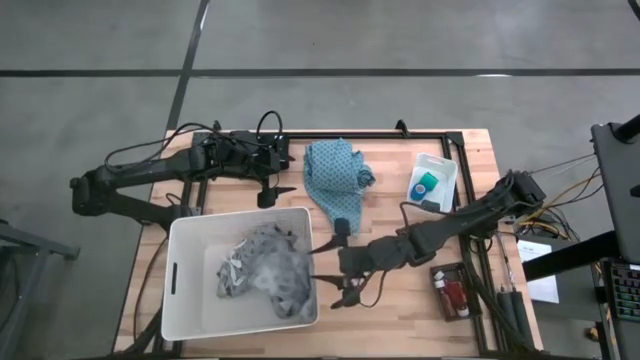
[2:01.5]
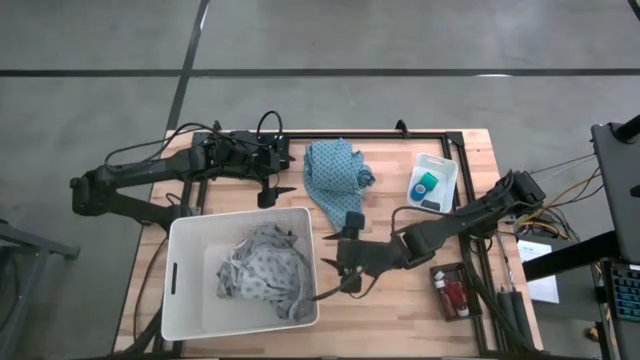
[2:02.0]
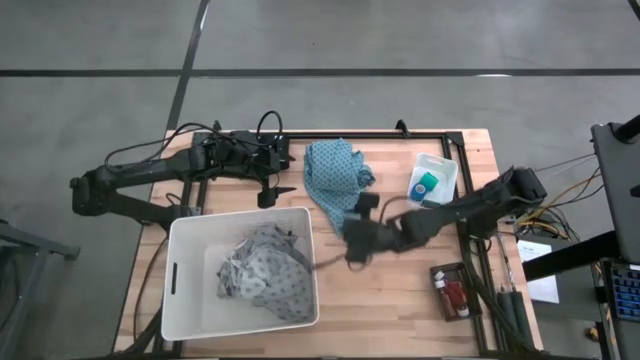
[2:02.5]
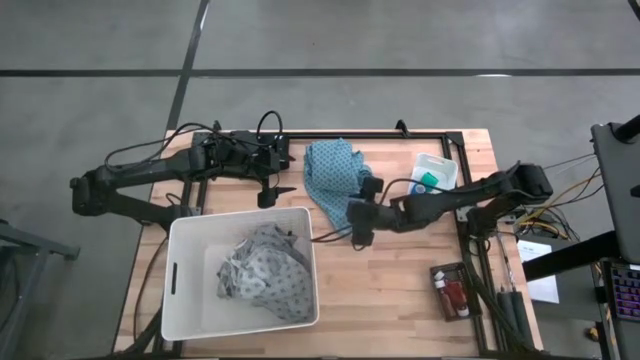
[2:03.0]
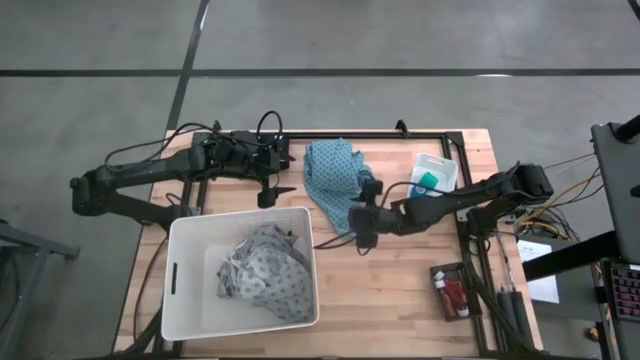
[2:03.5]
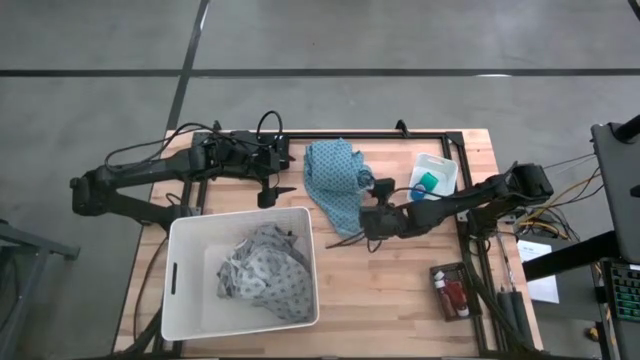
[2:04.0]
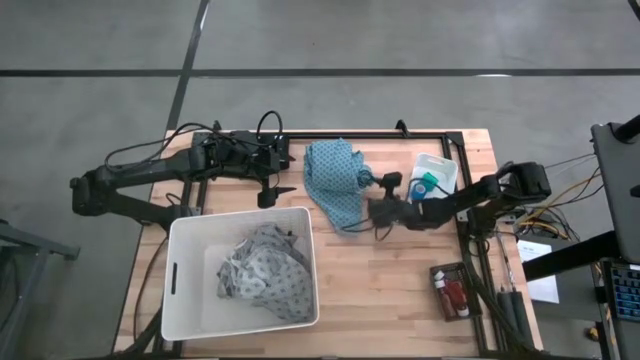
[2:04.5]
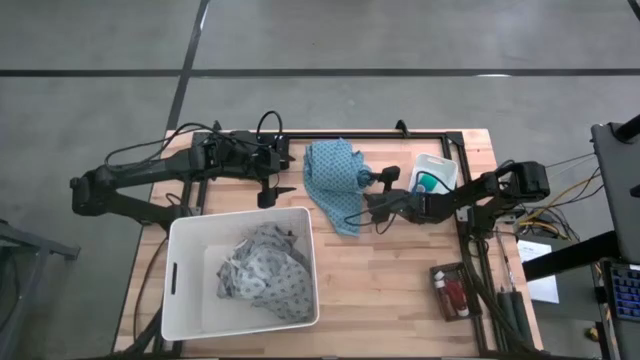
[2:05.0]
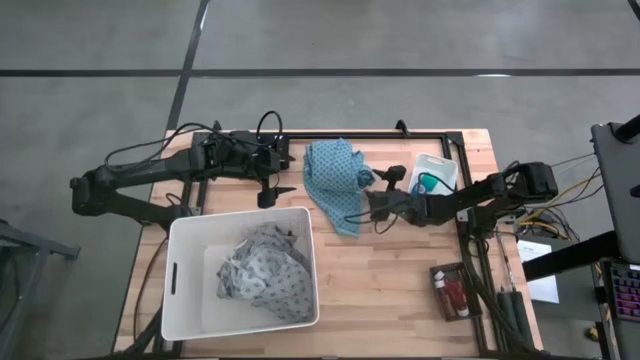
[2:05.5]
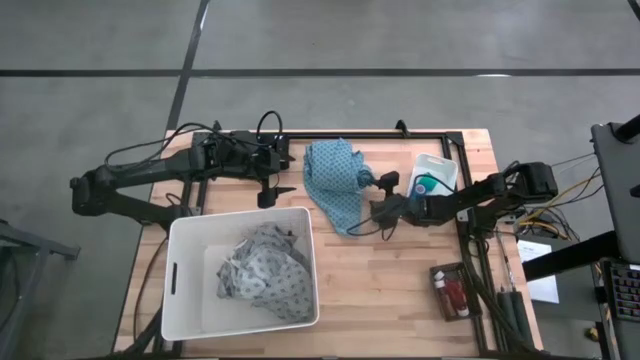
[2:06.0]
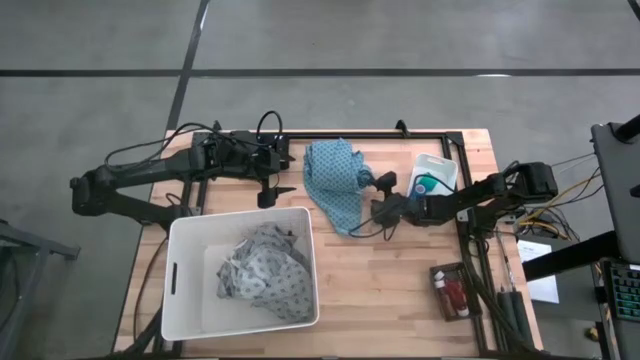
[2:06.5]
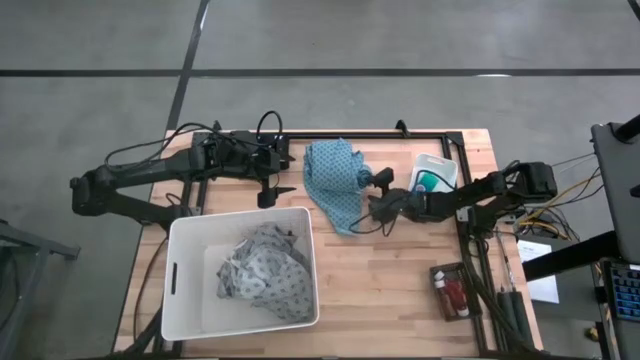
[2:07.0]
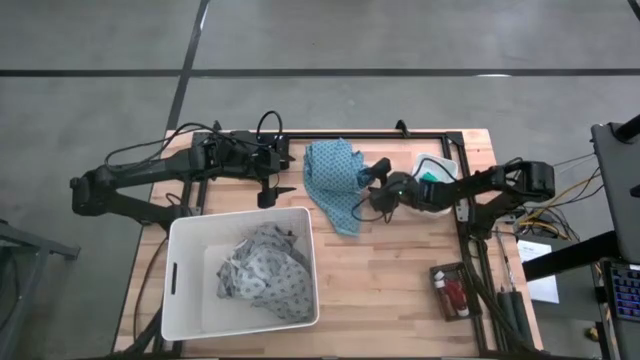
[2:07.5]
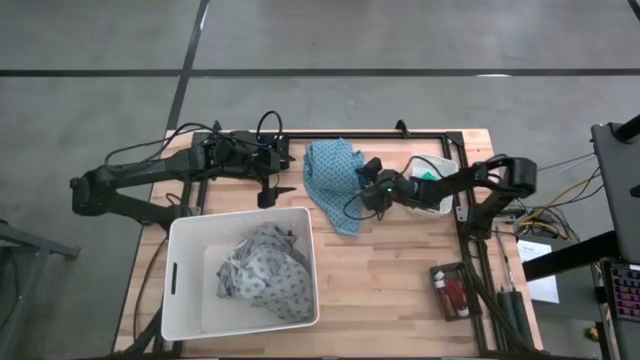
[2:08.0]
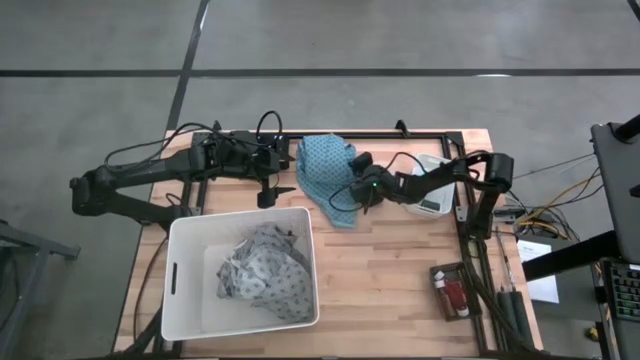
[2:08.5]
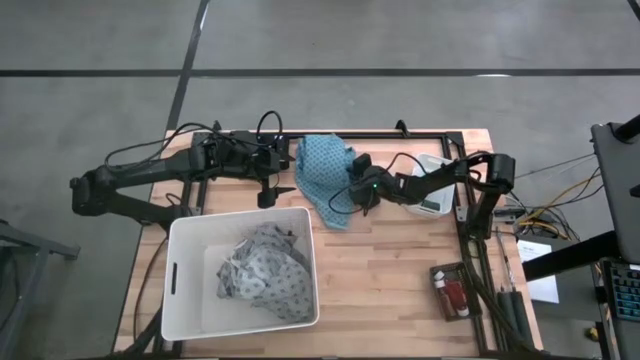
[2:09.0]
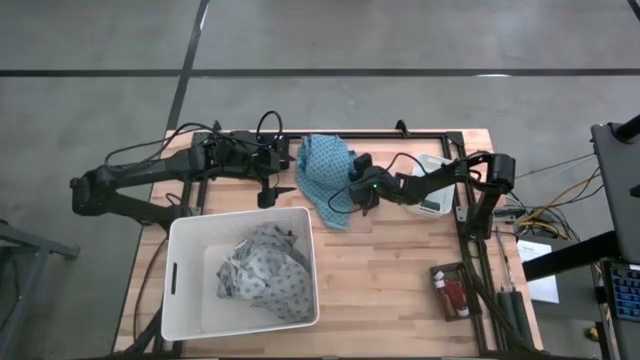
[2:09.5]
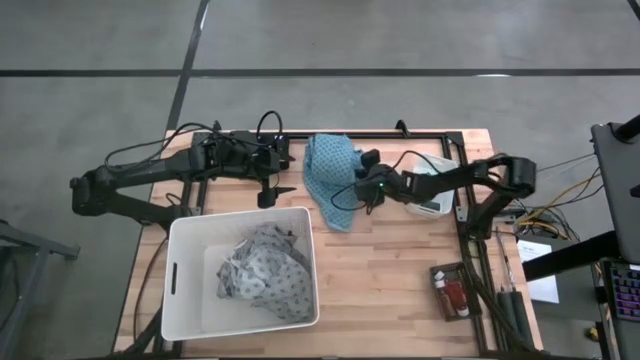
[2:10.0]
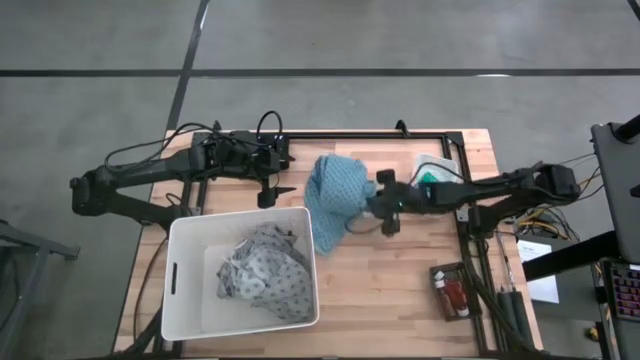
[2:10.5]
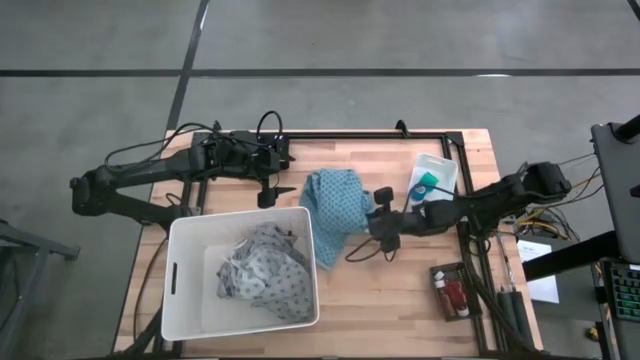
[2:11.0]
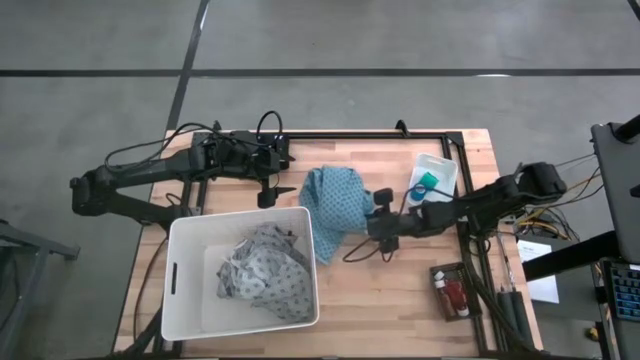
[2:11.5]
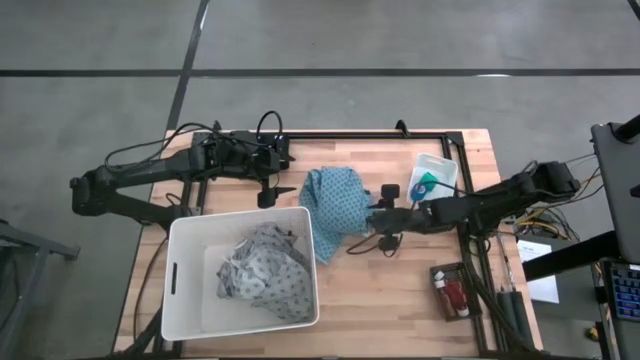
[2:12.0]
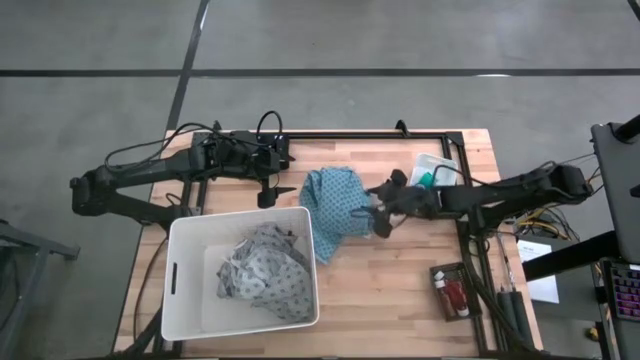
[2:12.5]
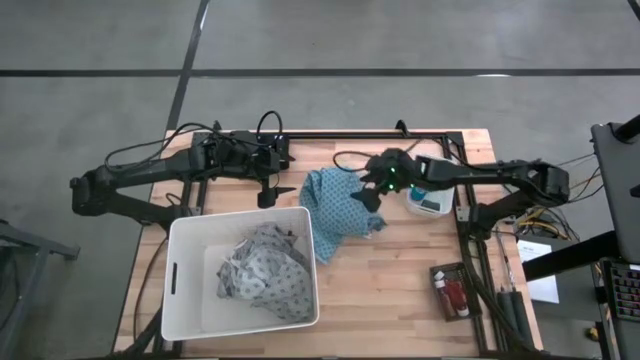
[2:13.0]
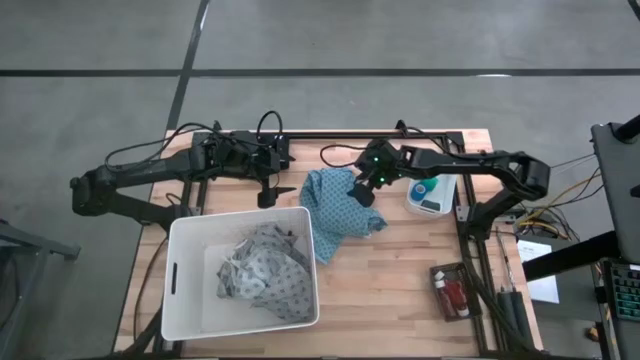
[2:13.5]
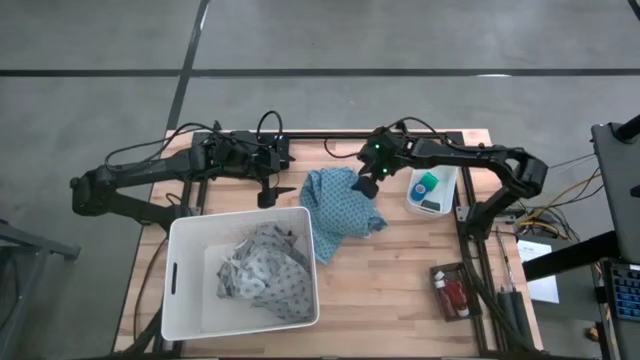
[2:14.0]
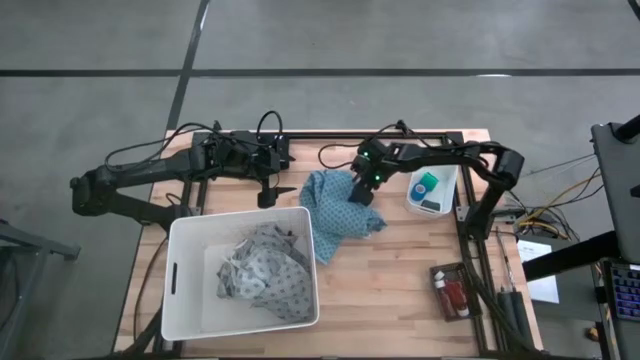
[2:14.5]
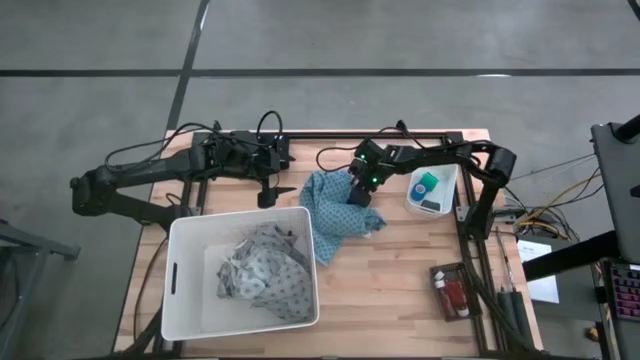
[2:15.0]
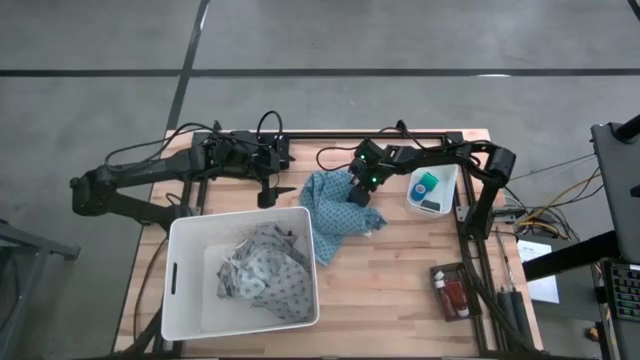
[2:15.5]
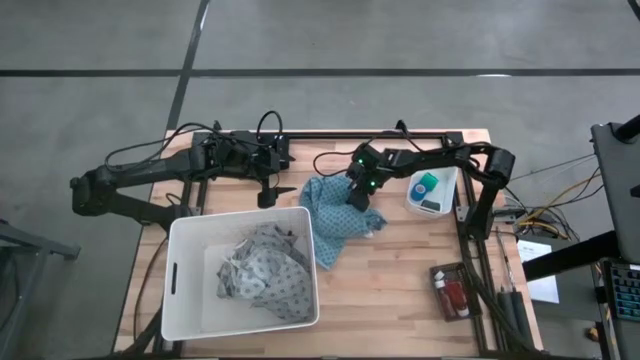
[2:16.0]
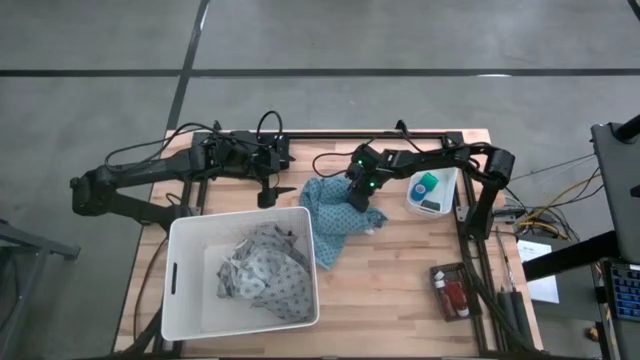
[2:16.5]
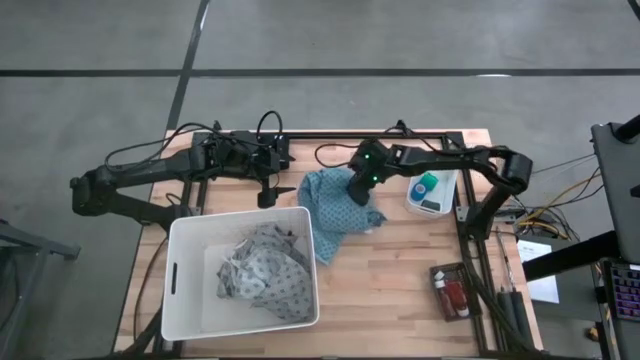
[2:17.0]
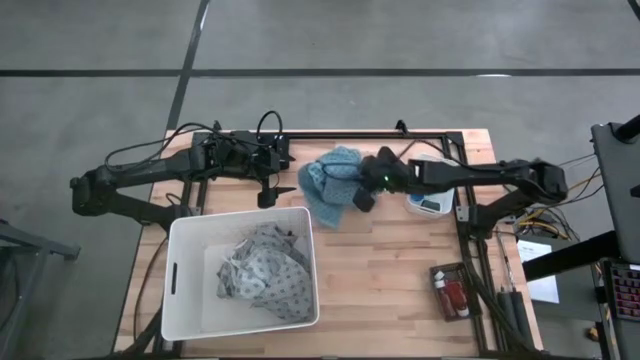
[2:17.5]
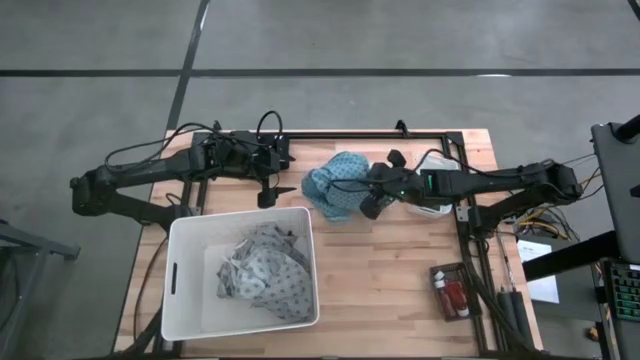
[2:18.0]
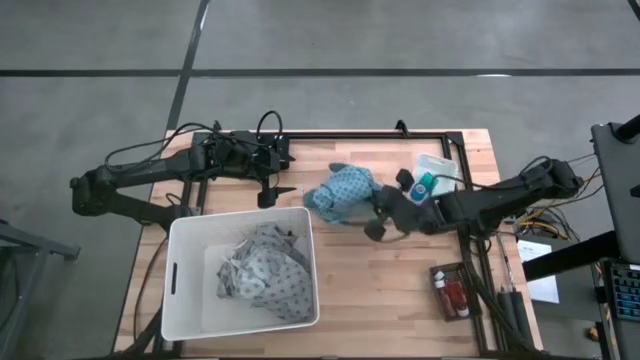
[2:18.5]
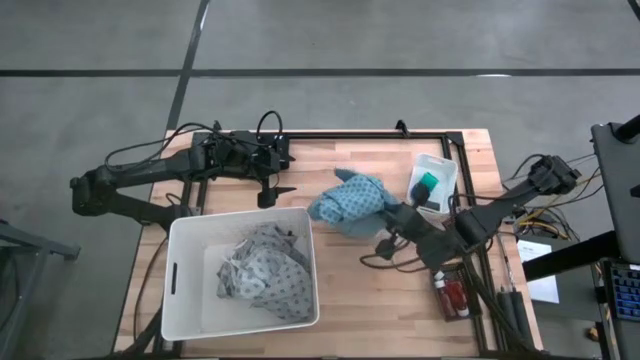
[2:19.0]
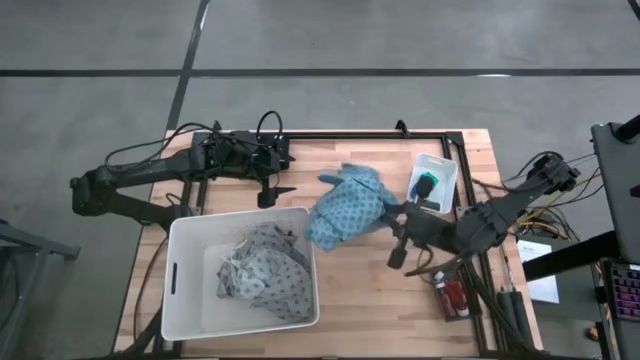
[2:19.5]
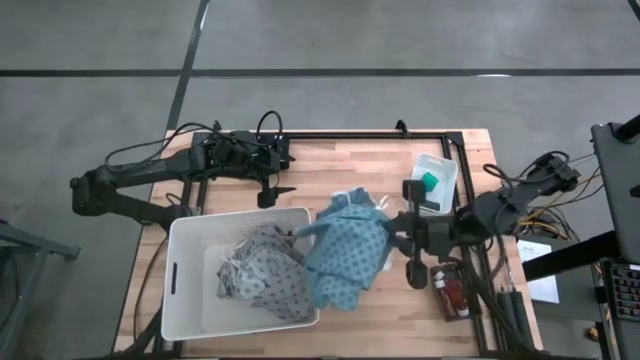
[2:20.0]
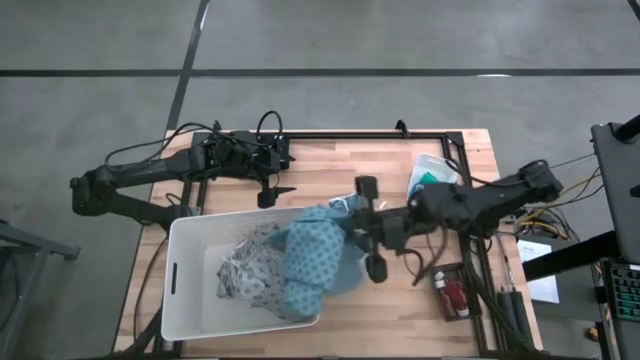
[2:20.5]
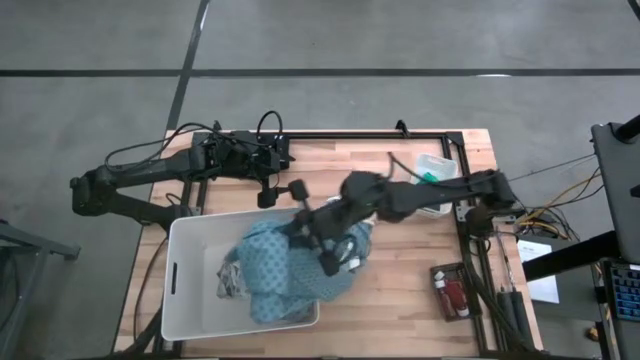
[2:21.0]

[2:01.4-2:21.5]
Task: Pick & Place Medicine items
Put the blue patient gown into the big white bin

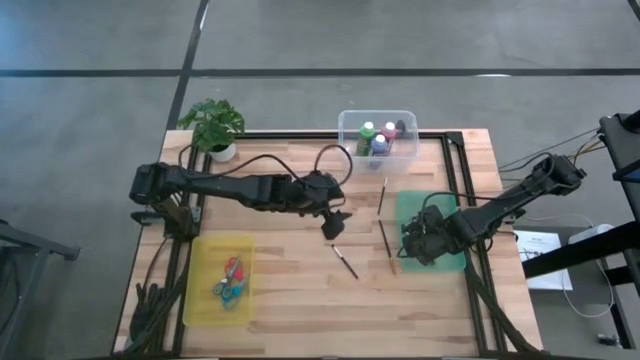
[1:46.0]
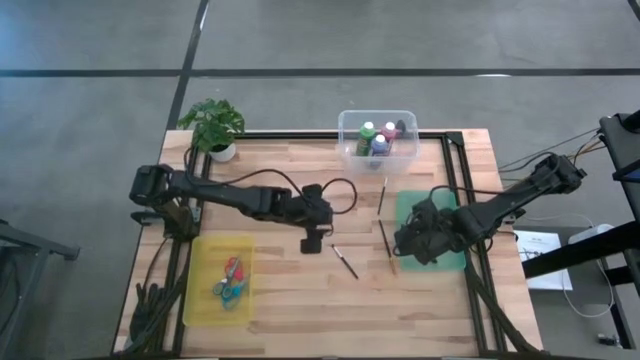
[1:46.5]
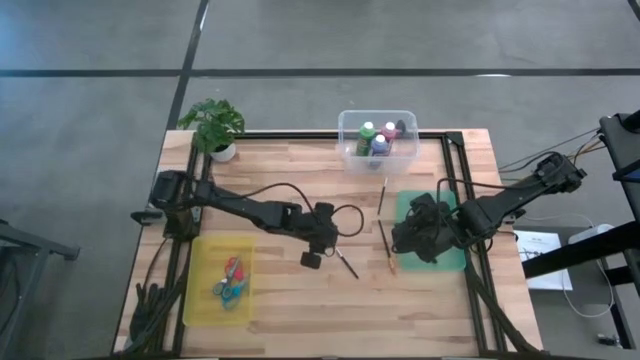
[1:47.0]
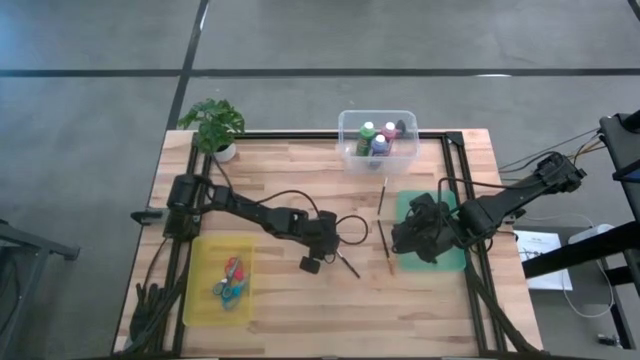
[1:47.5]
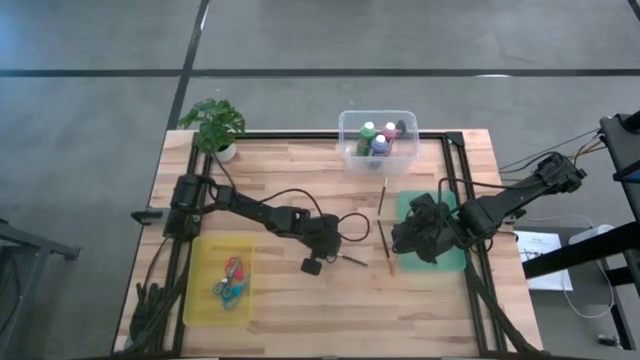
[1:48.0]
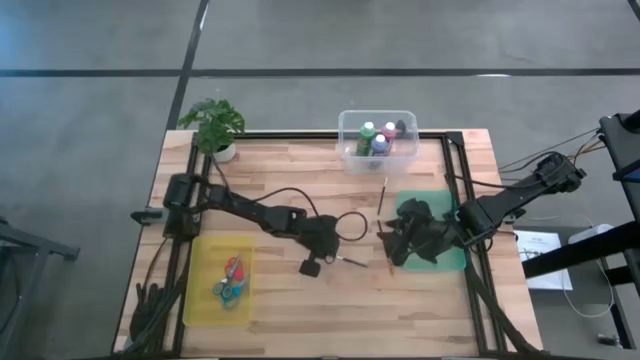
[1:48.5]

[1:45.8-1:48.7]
Task: Pick & Place Paint Supplies
Put the black foundation brush into the green bin
